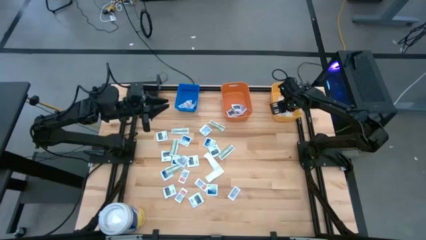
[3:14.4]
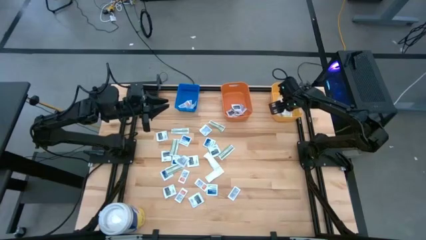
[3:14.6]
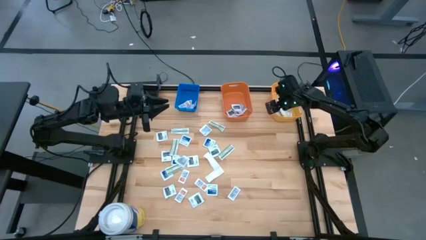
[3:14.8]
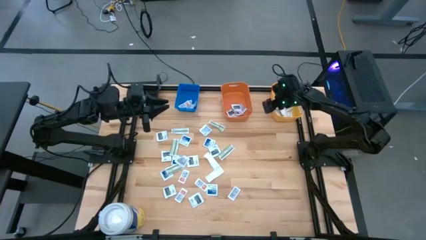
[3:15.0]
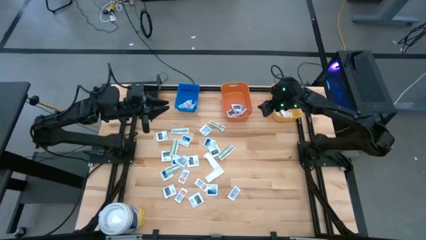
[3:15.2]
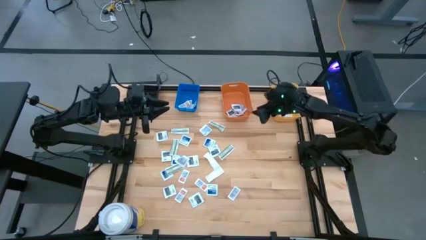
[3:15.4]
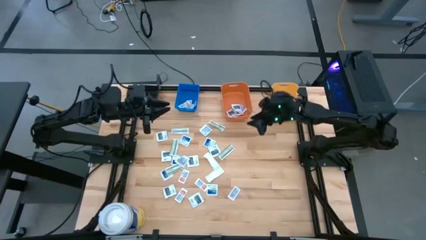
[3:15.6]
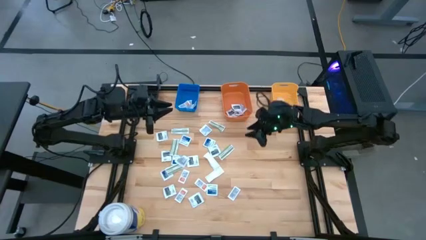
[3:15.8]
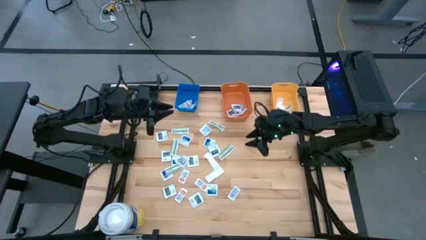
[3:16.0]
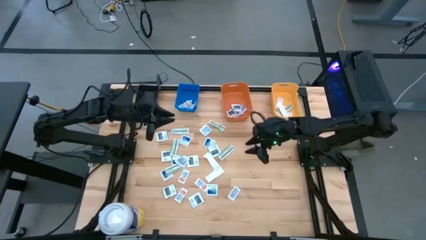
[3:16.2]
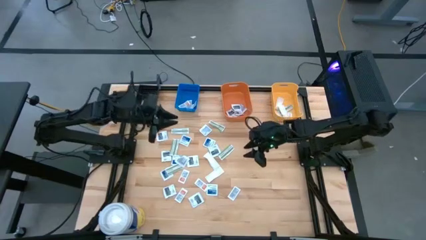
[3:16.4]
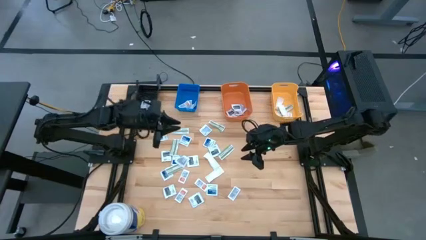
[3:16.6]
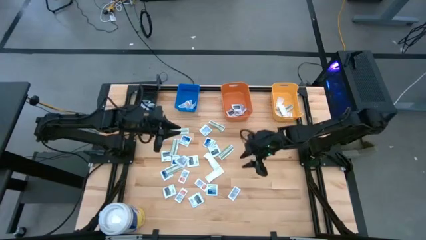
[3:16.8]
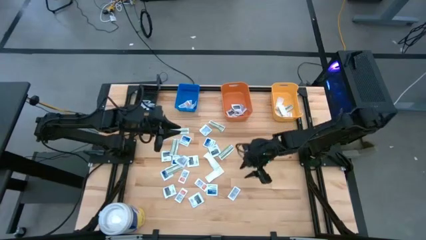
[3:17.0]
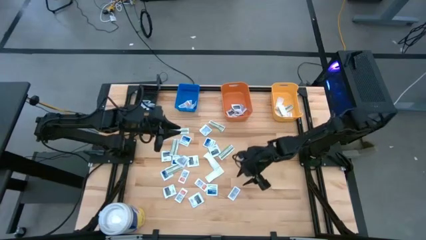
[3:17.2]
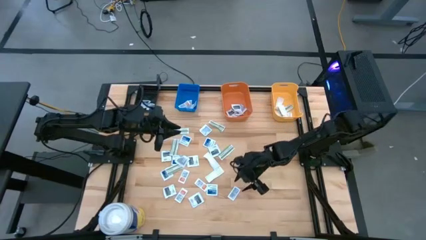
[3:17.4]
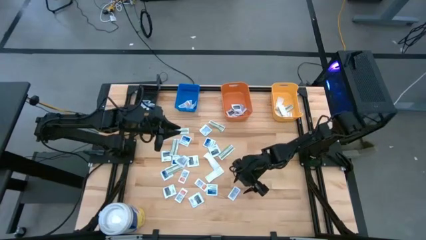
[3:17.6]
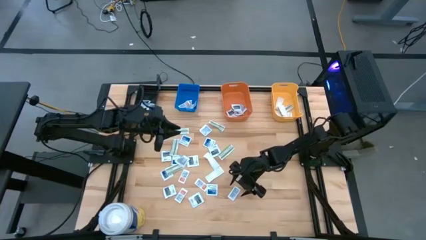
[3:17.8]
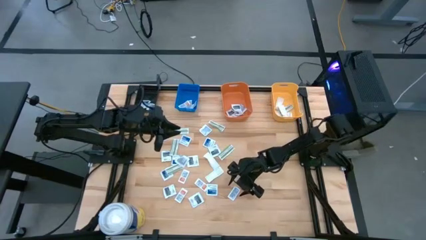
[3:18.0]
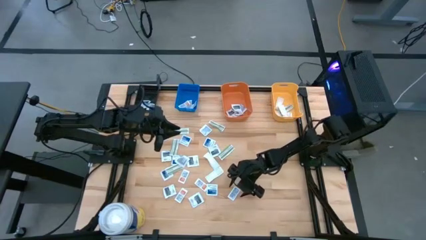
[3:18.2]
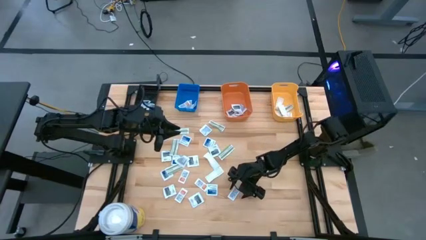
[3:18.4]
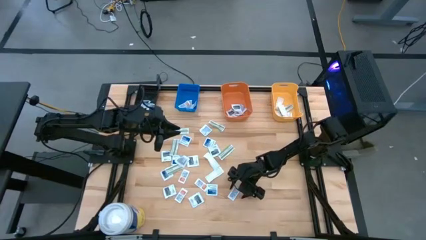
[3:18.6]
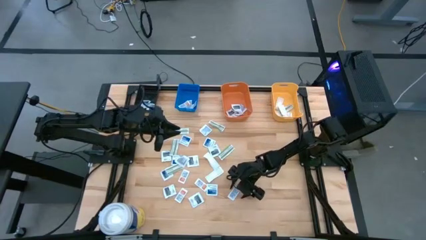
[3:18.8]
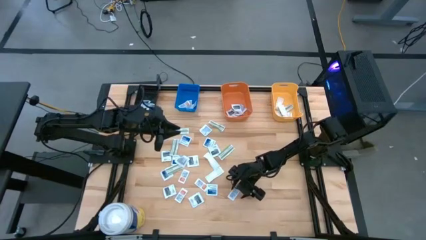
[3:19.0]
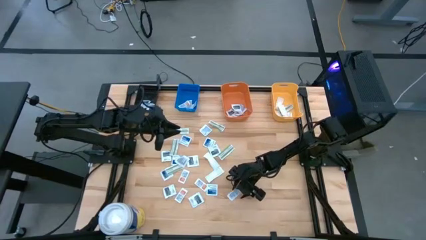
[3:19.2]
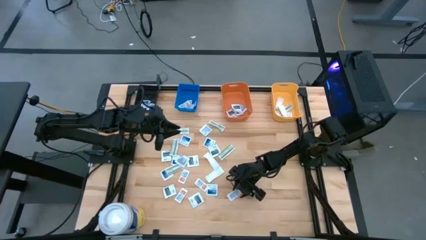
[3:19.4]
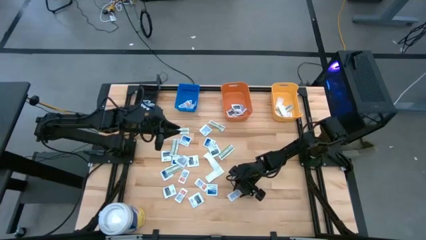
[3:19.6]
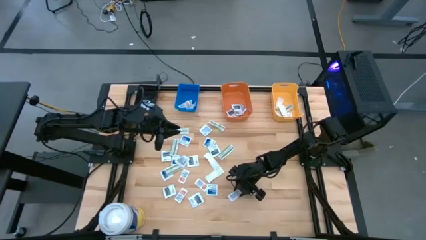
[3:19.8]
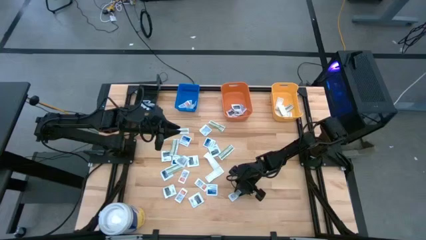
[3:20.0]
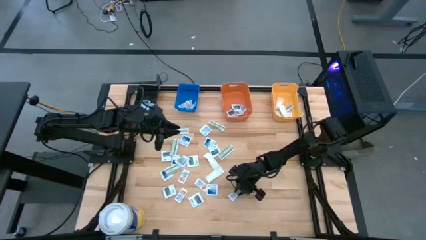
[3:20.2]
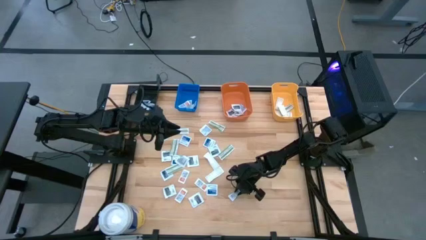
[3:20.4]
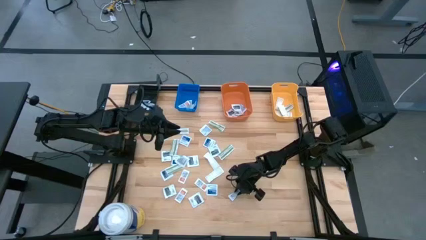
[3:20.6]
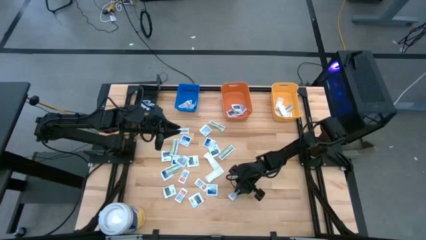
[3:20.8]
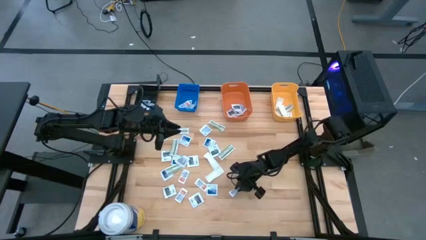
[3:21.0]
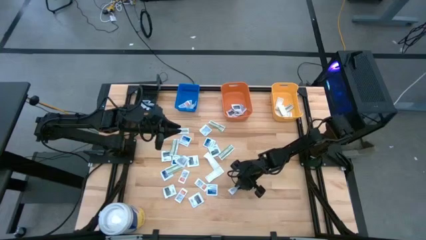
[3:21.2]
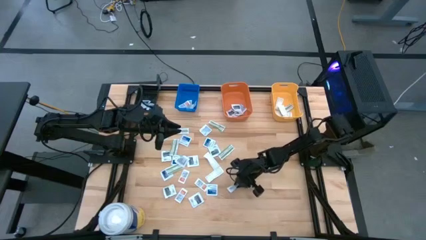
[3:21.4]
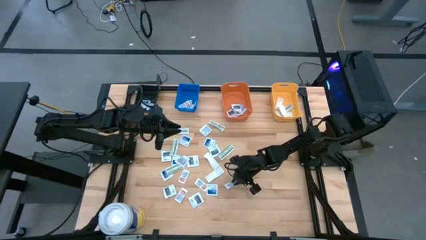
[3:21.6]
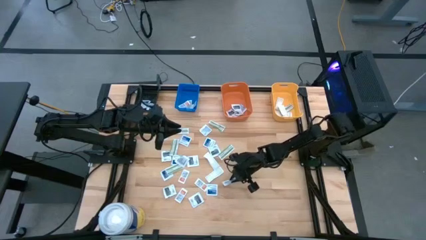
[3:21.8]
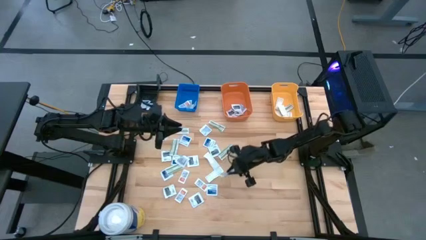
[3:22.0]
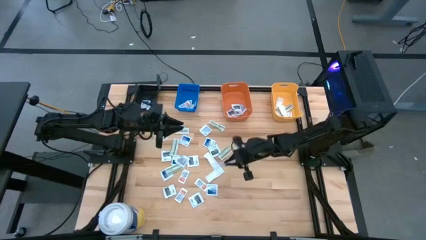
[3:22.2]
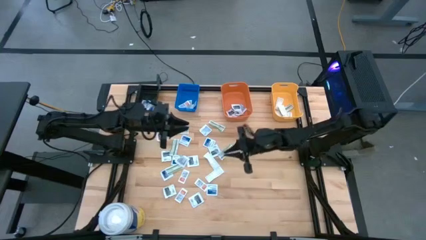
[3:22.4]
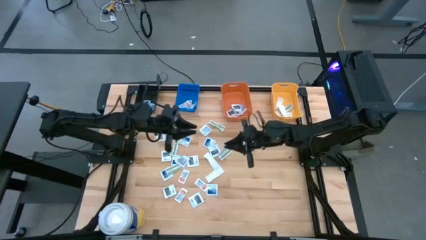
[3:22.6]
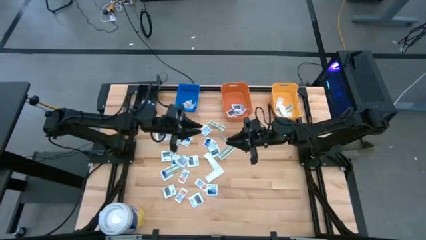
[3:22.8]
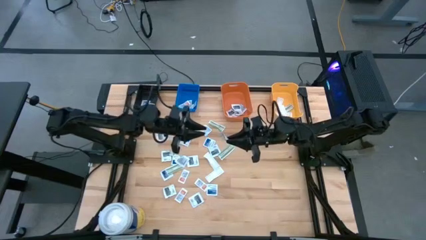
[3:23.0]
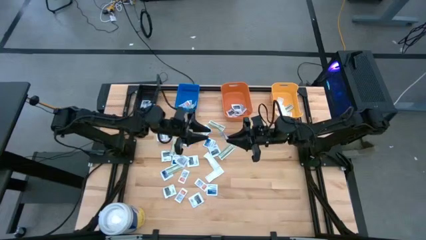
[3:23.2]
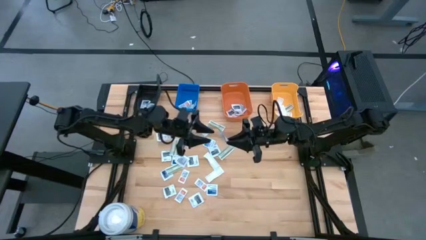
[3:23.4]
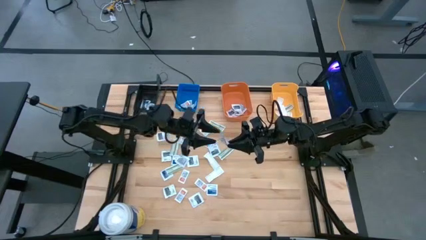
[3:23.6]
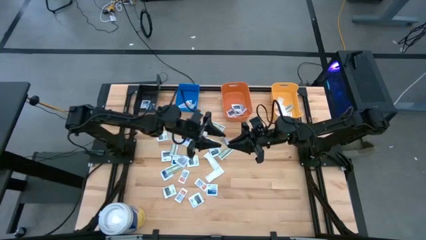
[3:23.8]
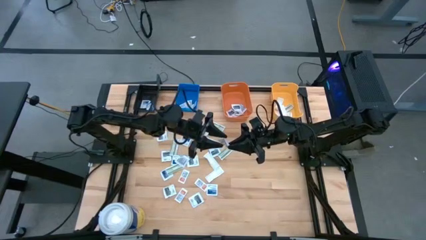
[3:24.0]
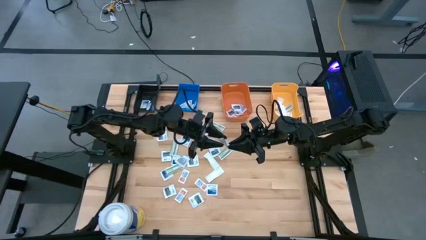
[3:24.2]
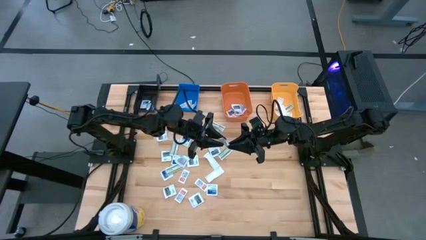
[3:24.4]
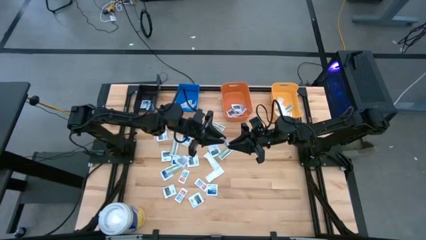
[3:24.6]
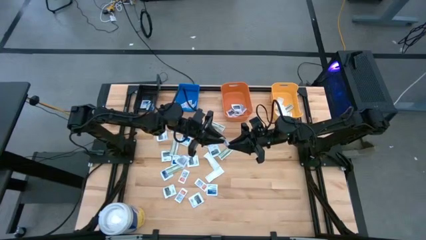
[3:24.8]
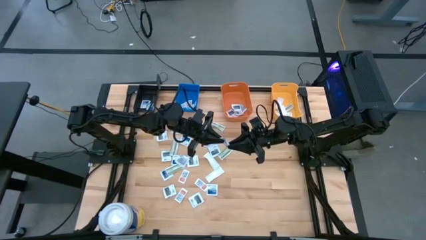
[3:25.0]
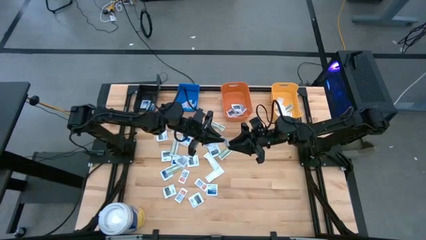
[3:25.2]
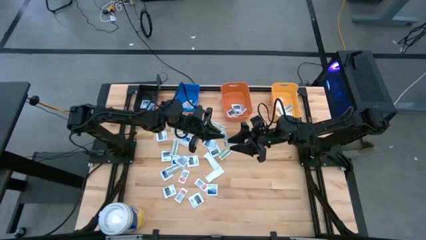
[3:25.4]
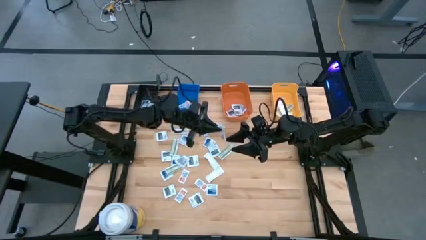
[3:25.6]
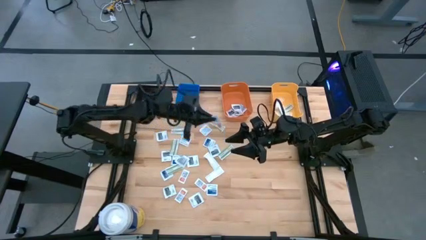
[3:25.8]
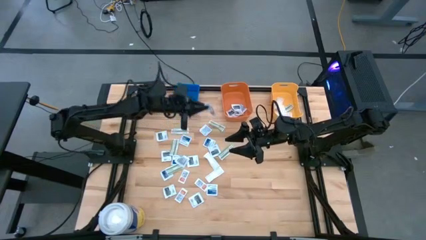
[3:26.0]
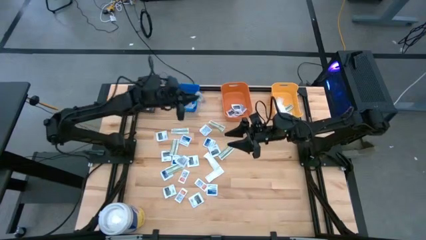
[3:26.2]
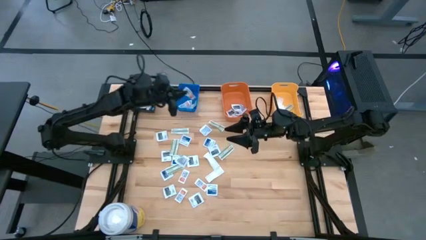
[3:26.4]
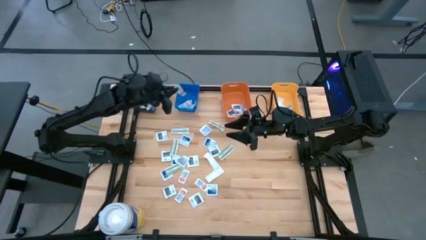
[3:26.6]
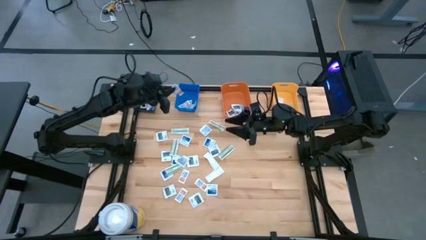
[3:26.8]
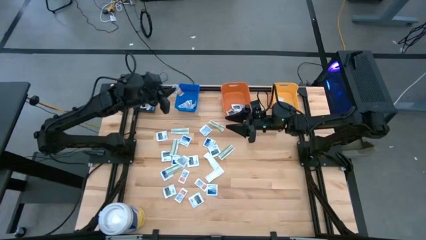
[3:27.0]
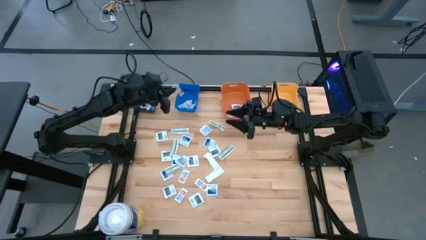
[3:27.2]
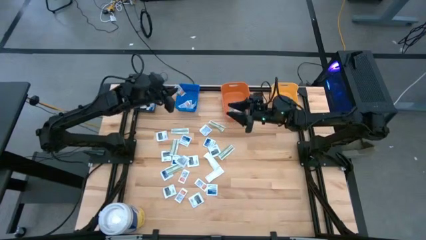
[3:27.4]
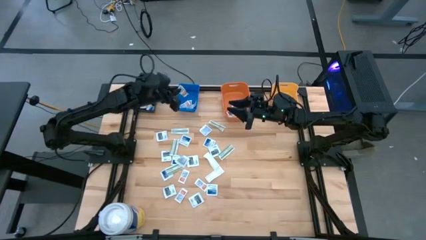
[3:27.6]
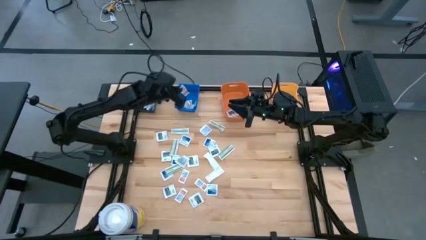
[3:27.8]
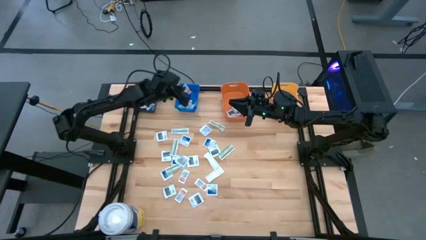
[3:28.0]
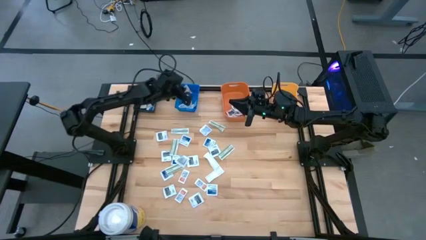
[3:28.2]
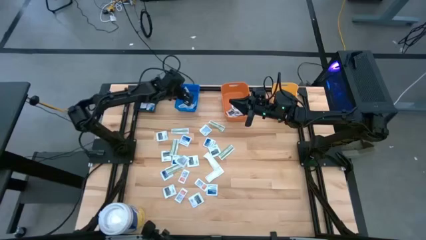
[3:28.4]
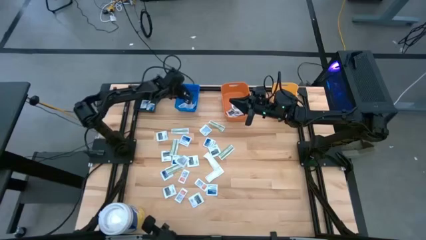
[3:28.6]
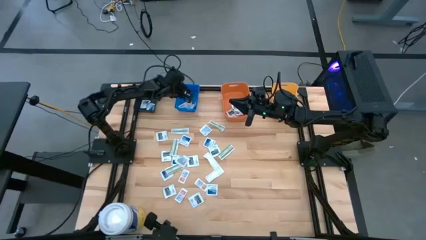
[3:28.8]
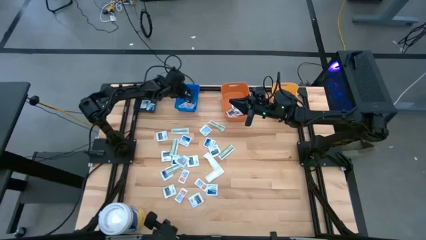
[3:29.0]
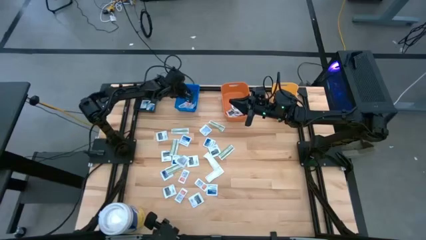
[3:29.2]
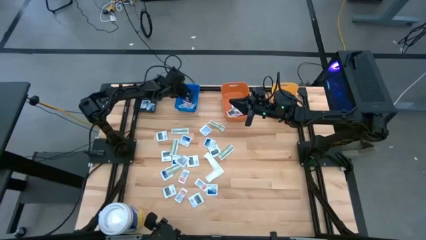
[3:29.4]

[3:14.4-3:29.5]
Task: Pick & Place First Aid Supplies
Put the ointment pack into the blue bin
